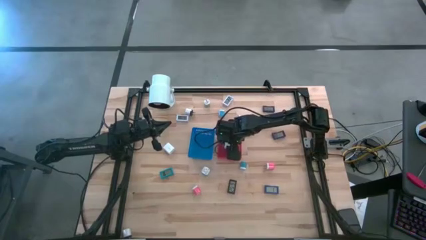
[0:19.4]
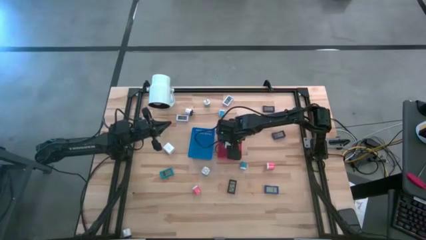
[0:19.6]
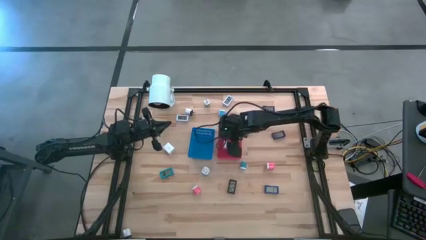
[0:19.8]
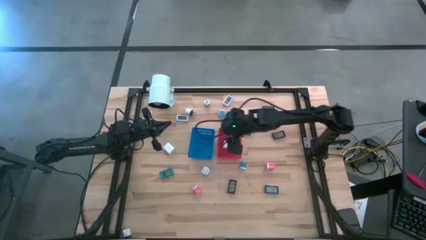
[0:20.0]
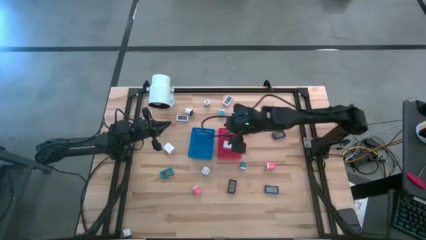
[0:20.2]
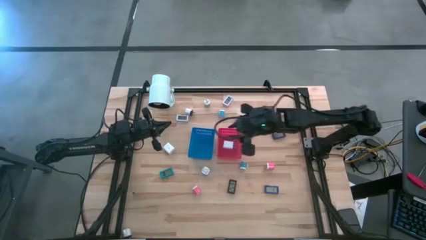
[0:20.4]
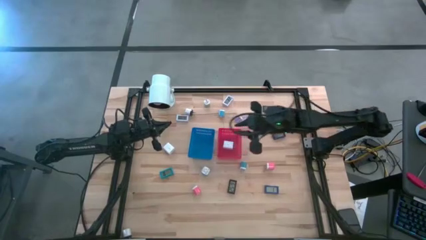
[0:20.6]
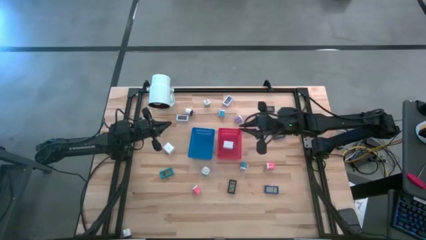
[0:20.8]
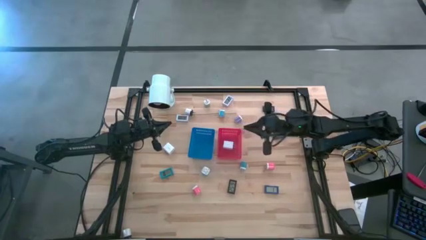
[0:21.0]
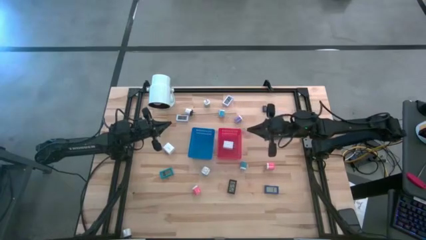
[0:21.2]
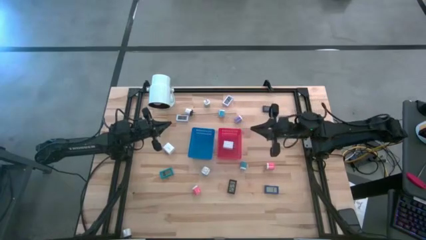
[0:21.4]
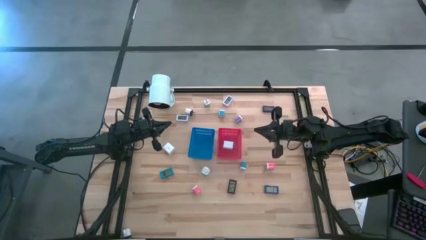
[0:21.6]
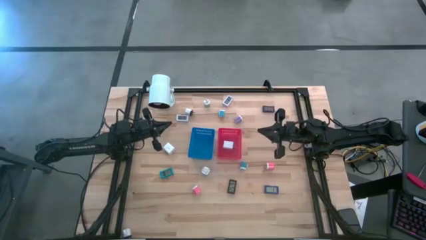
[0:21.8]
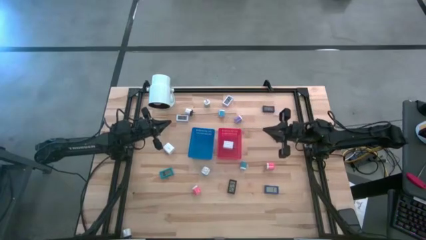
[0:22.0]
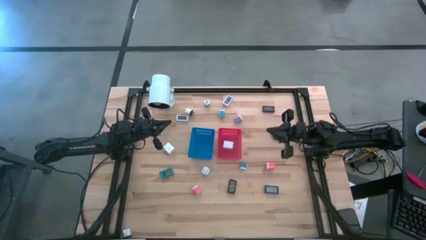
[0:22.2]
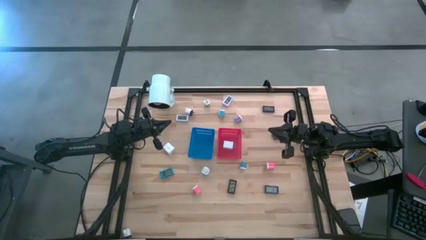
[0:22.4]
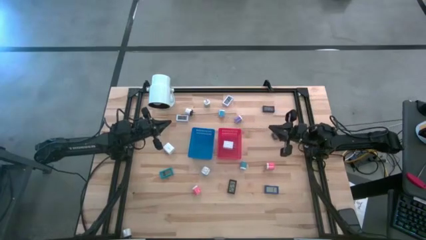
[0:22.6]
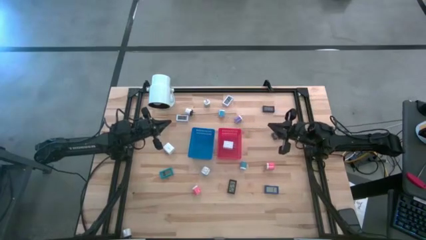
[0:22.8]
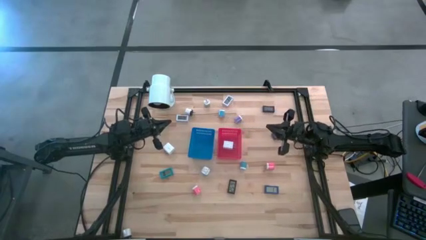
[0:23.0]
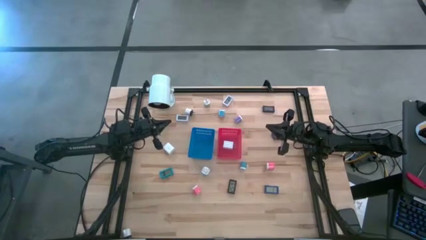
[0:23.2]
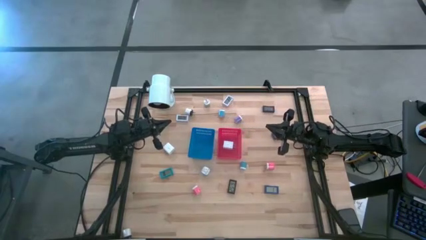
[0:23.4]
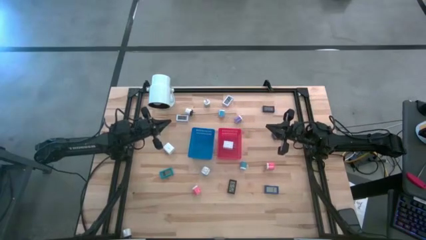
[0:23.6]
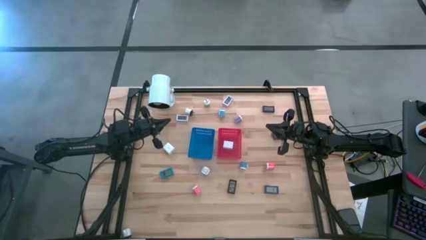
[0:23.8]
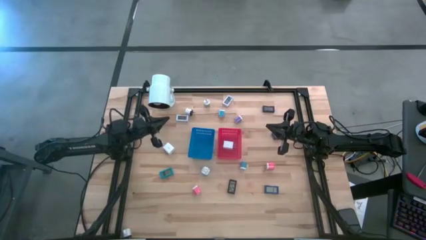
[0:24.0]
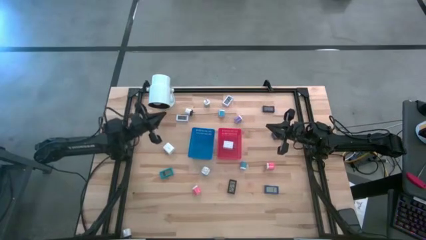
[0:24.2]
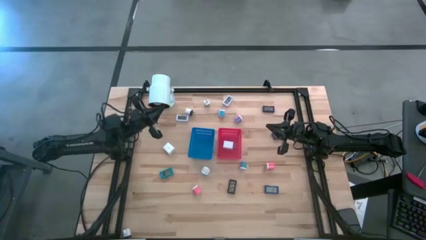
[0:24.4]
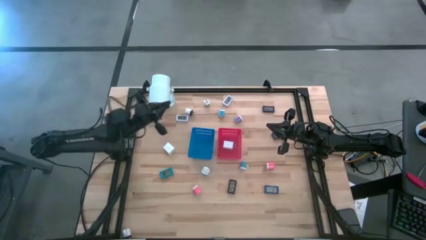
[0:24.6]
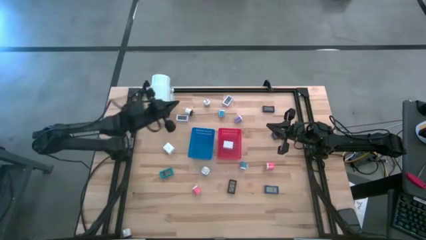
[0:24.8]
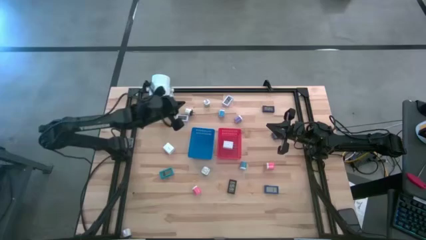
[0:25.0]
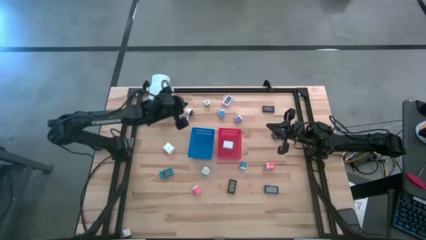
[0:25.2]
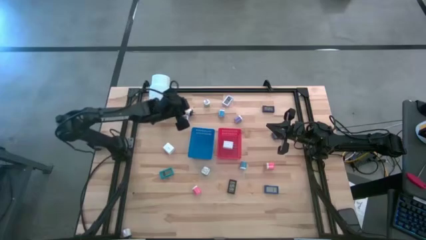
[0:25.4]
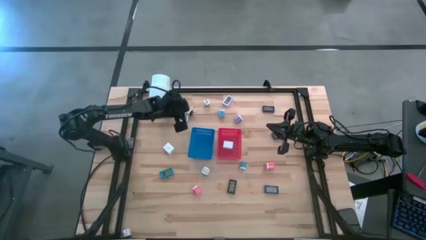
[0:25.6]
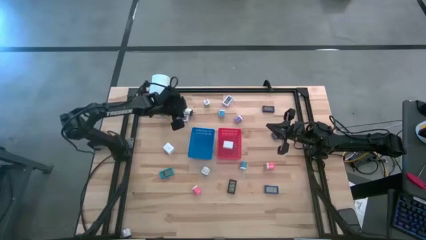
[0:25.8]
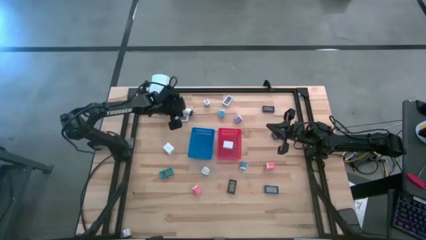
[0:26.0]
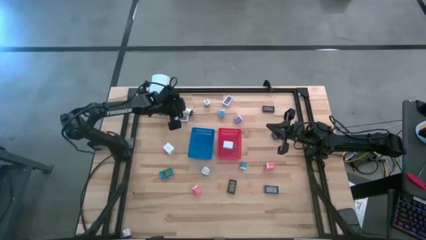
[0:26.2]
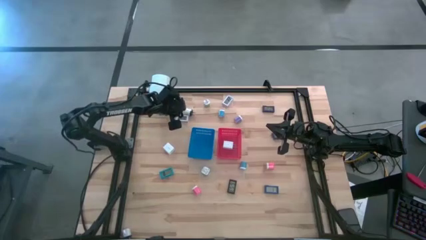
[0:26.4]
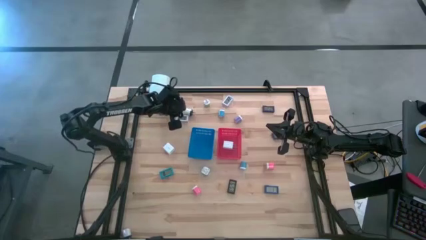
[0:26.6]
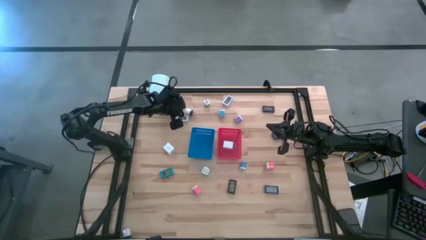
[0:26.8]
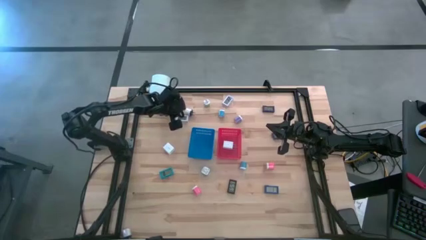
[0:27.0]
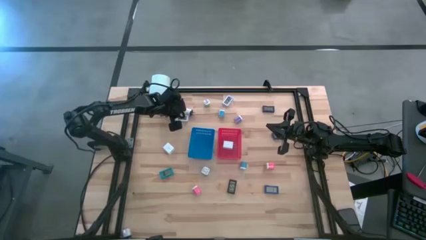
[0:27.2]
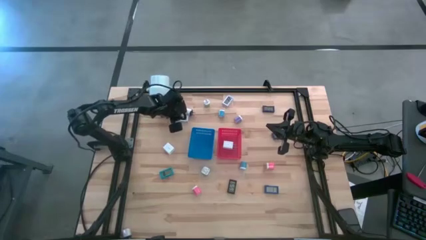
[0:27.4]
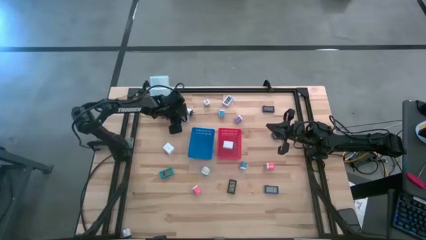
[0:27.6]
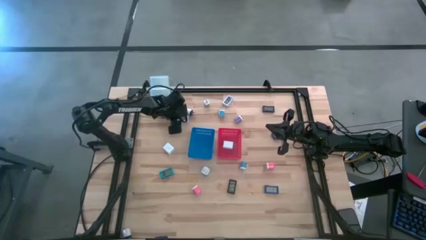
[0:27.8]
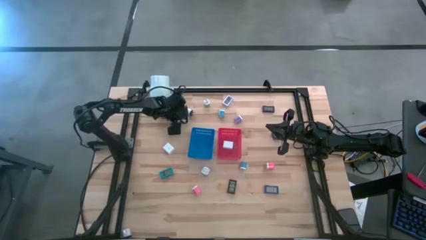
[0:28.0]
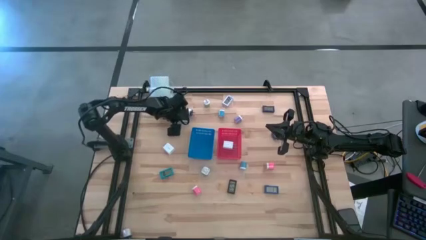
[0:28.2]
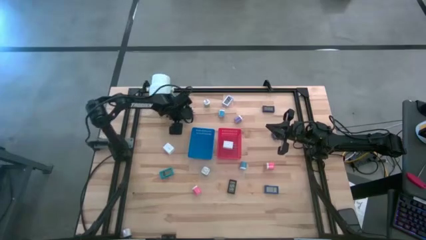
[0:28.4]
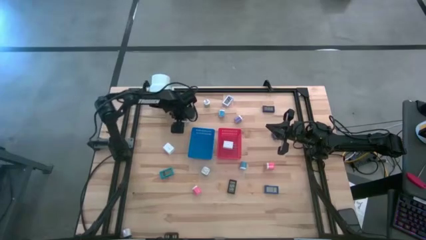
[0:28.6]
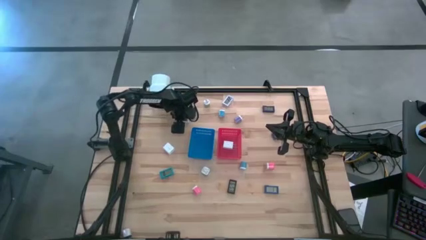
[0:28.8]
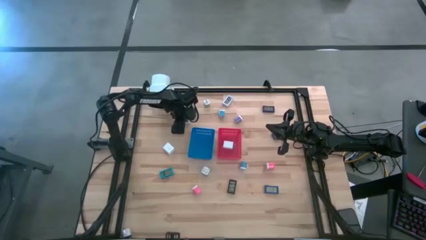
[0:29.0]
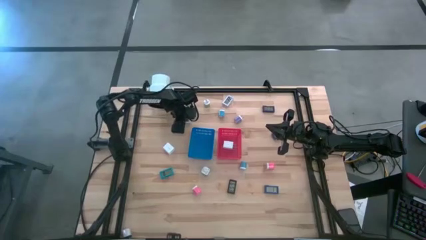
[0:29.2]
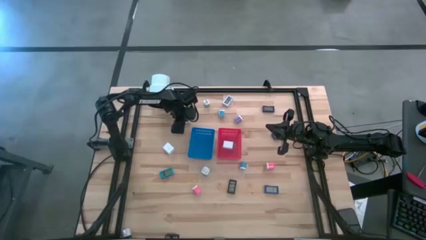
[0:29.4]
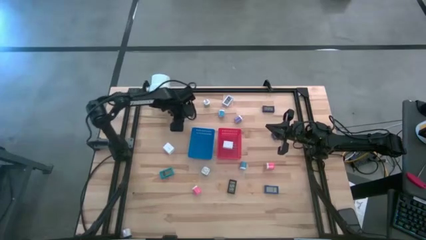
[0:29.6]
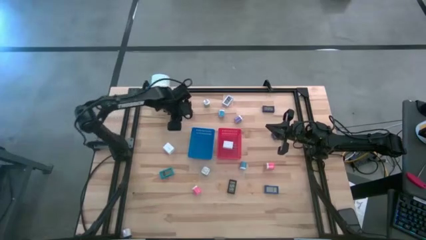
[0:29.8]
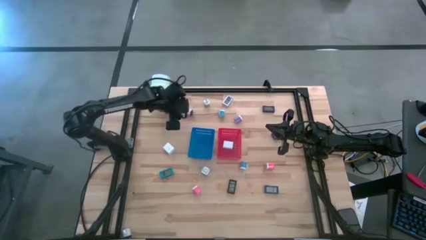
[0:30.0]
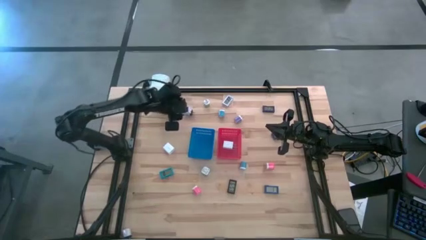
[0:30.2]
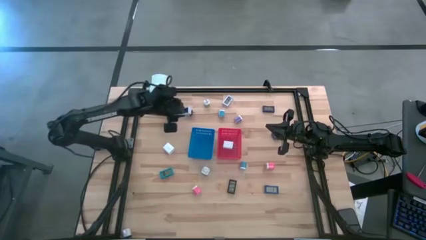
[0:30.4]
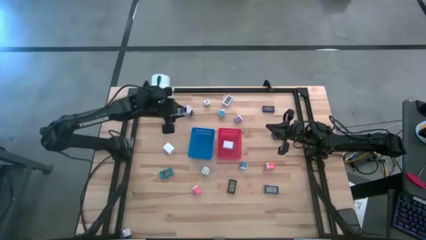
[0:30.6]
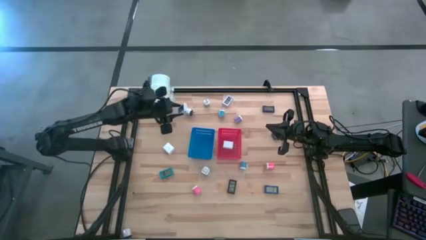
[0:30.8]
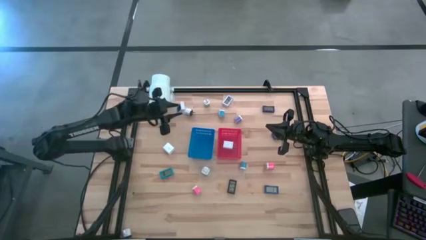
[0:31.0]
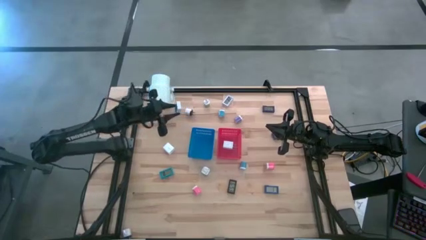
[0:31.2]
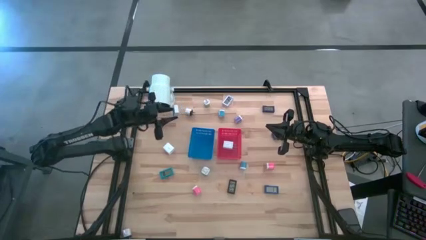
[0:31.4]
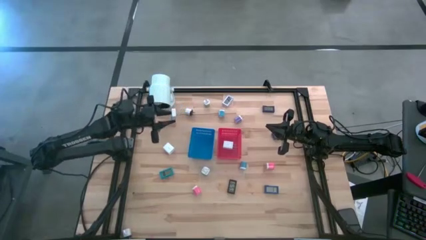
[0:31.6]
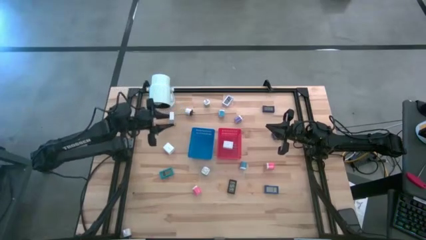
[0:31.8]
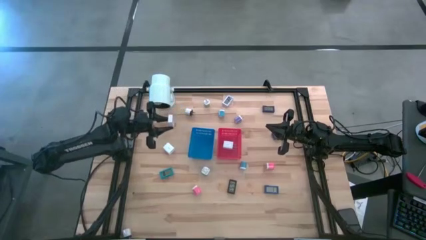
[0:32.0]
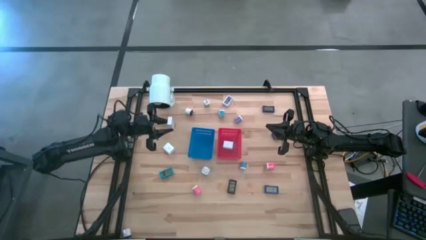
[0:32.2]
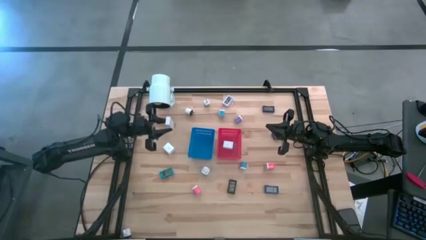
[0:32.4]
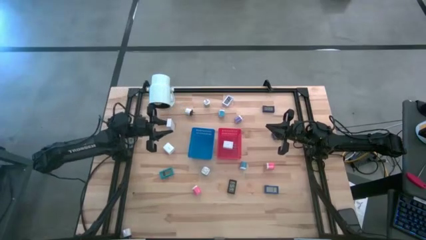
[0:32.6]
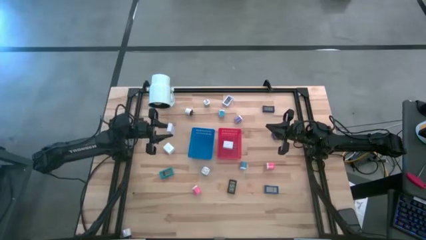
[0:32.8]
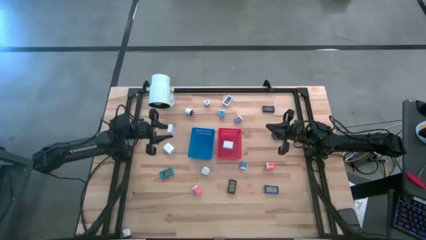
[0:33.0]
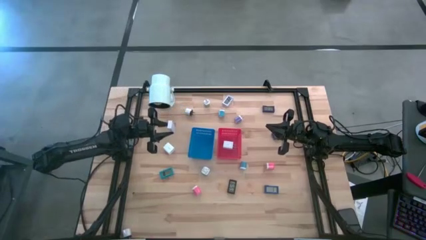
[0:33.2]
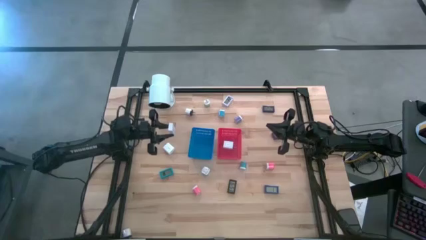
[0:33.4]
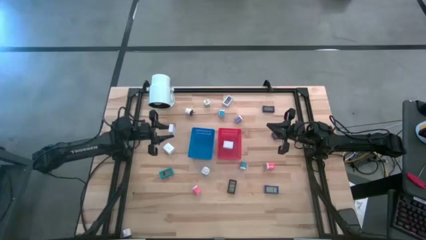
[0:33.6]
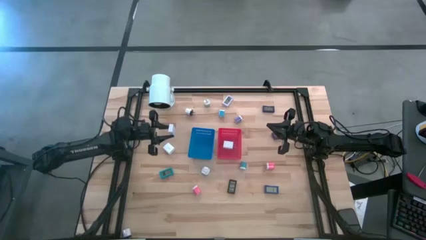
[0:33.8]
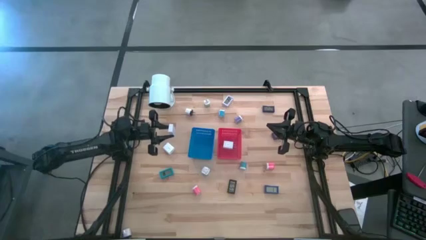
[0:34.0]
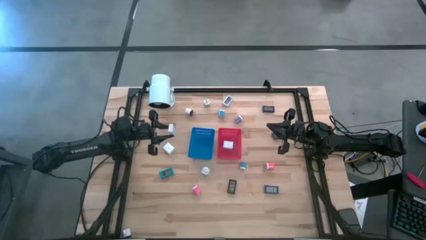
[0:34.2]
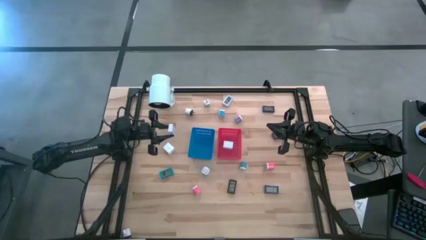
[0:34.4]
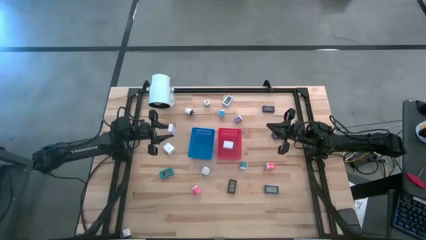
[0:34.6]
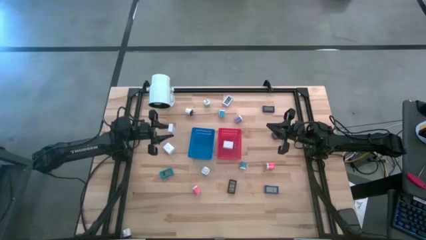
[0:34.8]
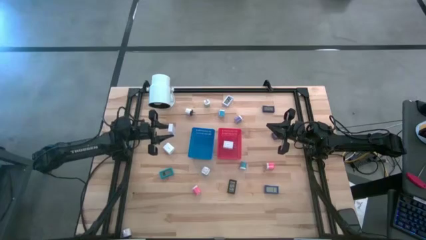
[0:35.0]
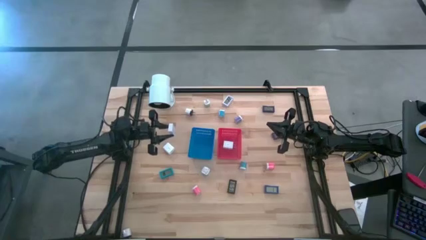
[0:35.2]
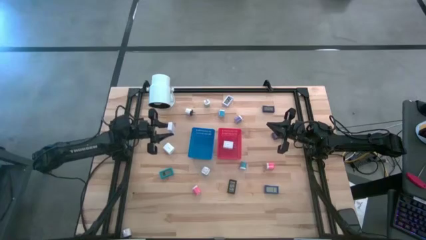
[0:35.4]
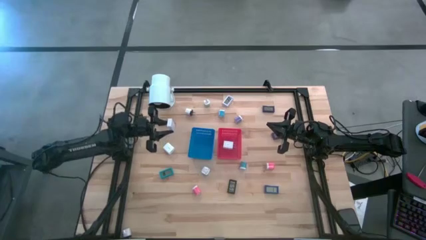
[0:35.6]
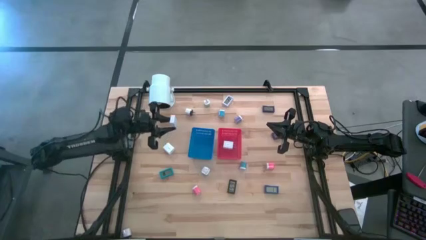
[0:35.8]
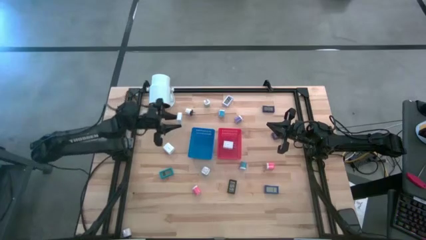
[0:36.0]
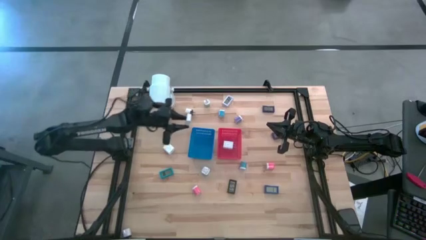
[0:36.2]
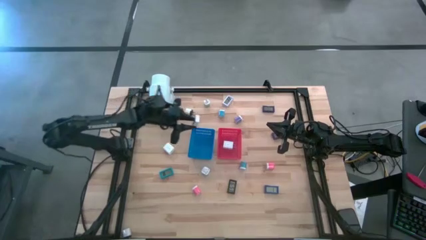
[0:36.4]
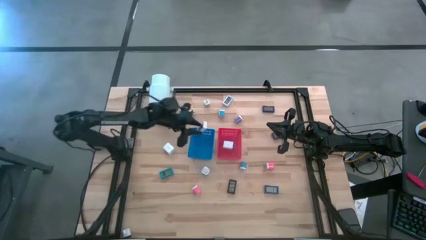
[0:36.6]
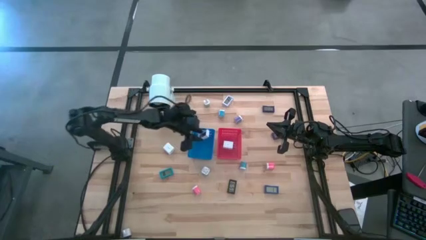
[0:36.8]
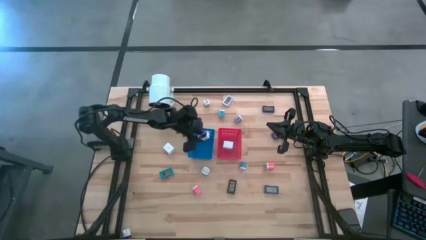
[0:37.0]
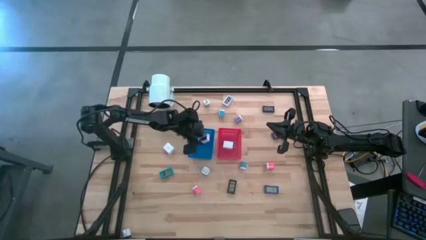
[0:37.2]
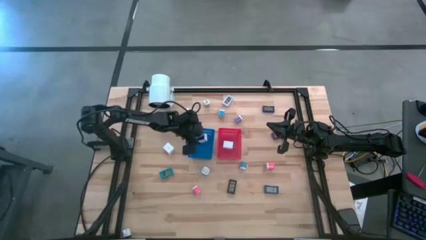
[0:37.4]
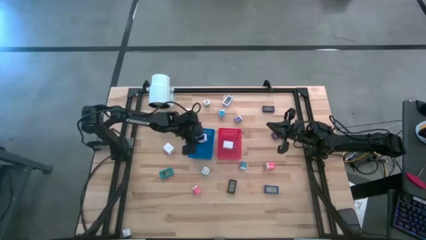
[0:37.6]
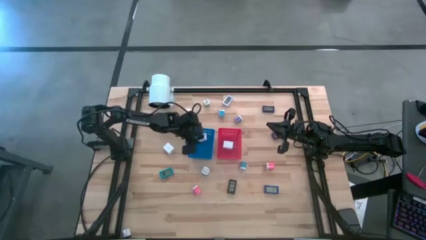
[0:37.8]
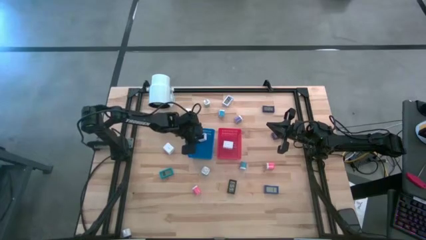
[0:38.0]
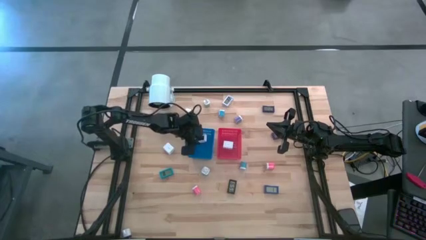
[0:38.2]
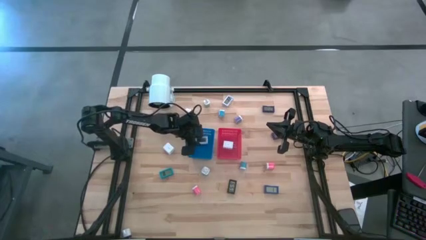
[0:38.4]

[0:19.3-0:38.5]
Task: Pick & Place Office items
Put the white digital clock into the blue bin
